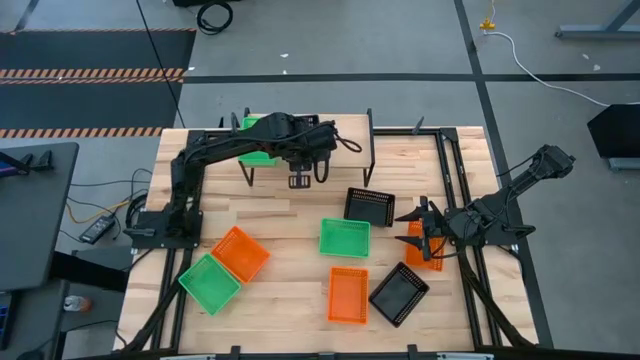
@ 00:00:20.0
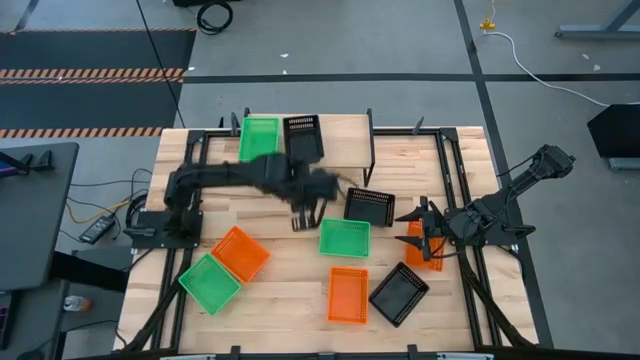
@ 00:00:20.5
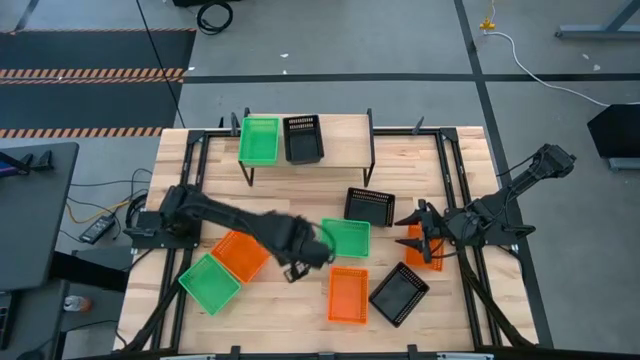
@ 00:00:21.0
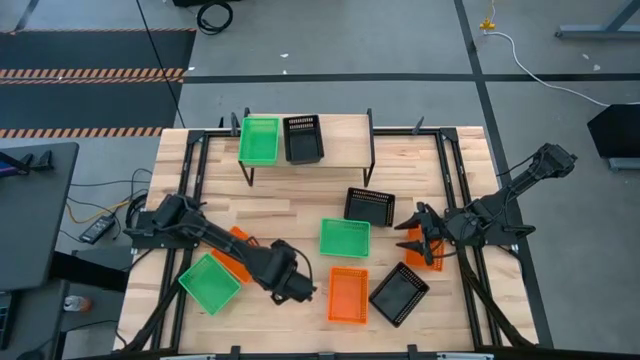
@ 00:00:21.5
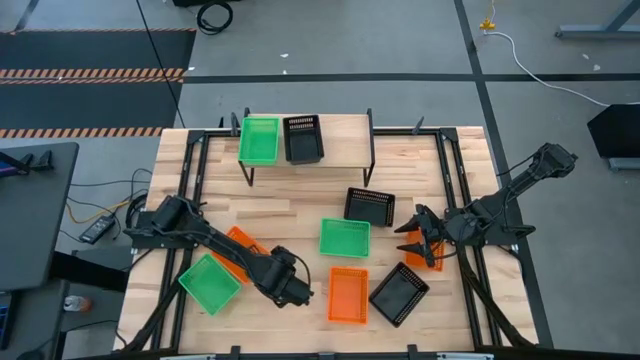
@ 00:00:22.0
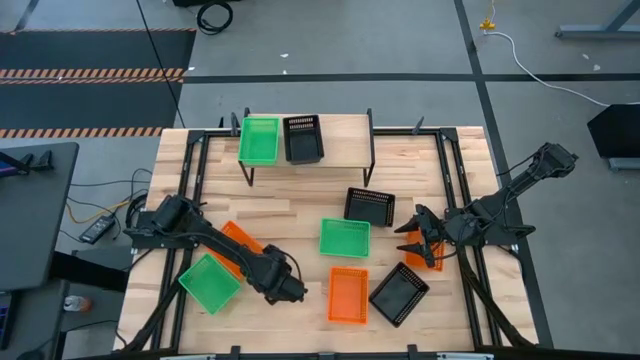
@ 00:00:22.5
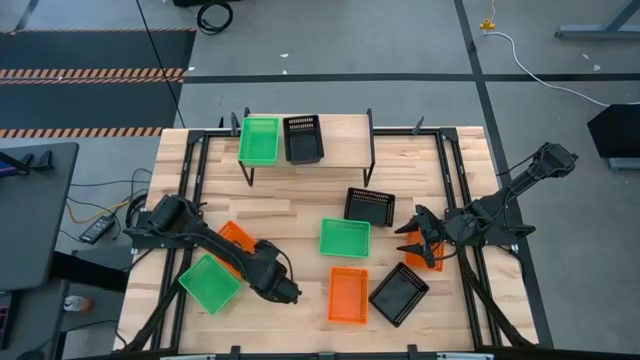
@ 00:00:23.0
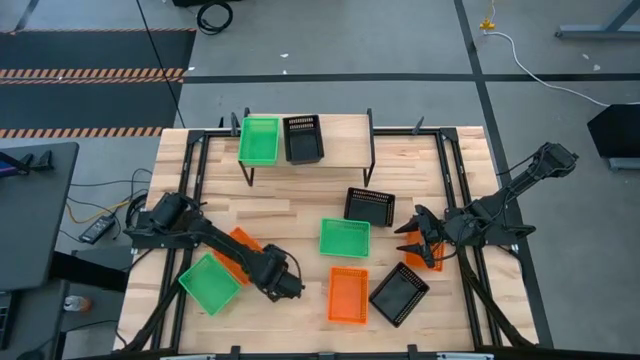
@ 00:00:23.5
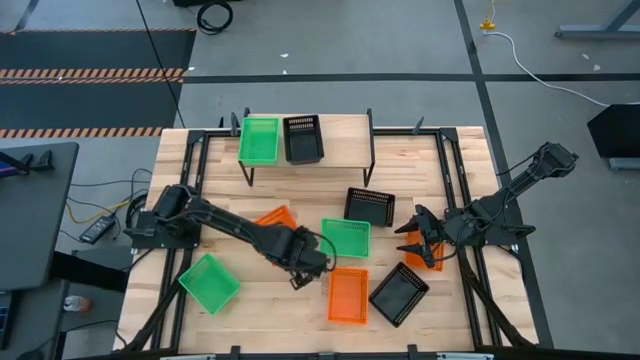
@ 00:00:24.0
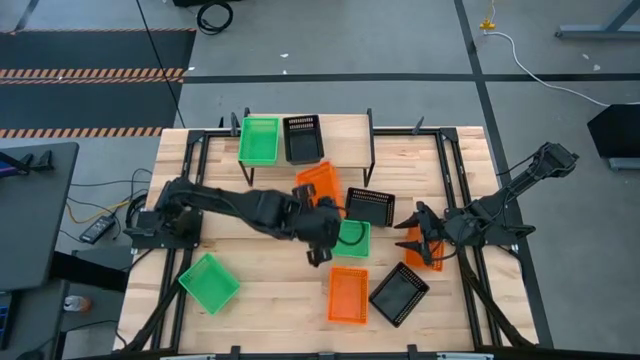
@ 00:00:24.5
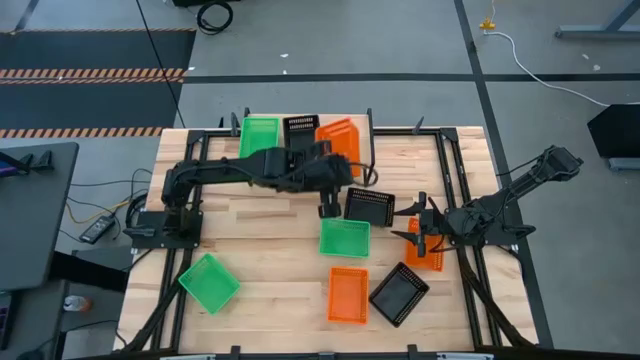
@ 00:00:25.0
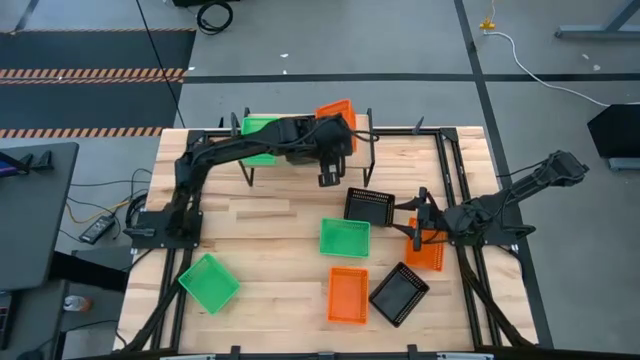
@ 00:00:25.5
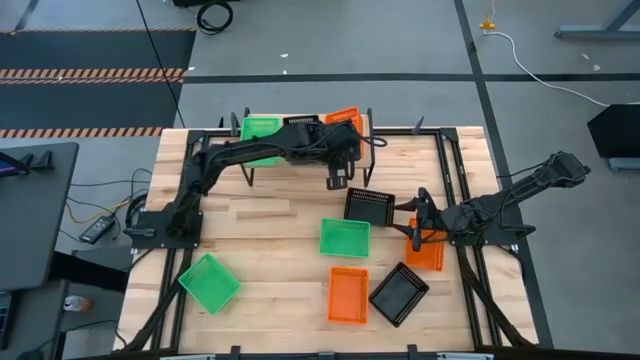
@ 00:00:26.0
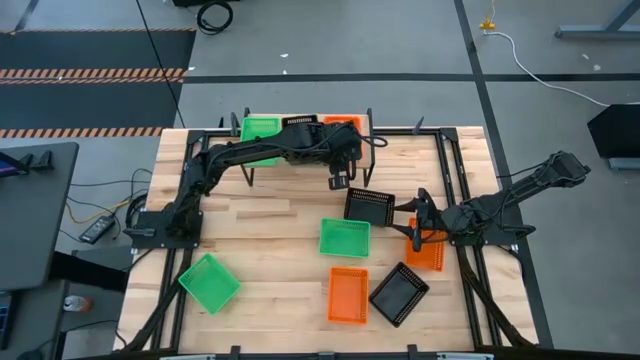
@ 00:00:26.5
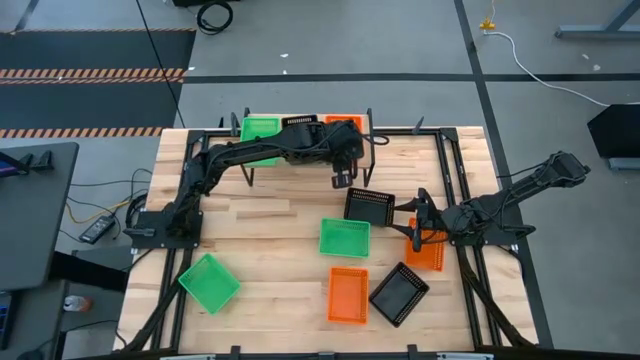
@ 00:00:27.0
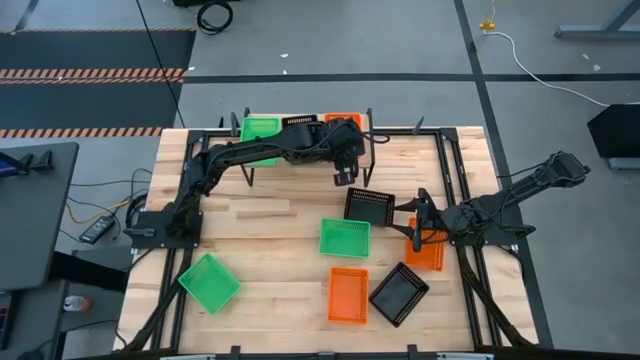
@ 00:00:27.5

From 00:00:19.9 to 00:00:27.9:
Task: Stack baskets on shelf by color
Put the left orange bin on the shelf

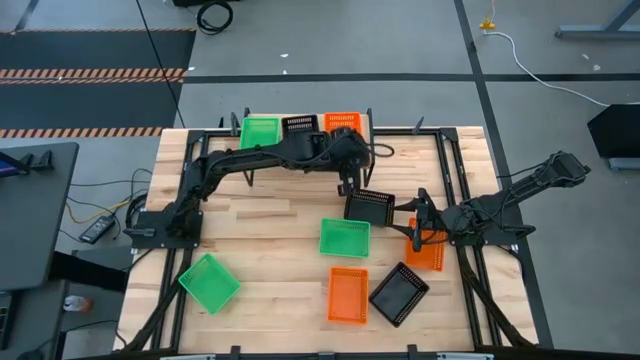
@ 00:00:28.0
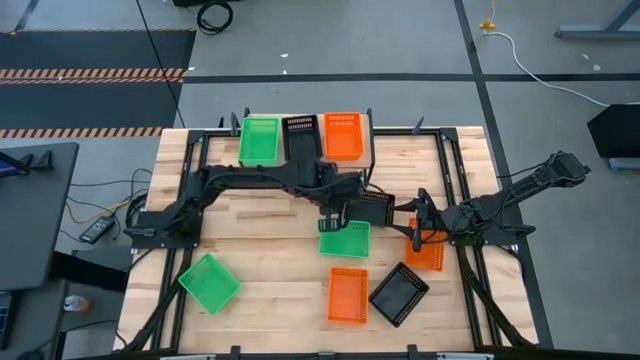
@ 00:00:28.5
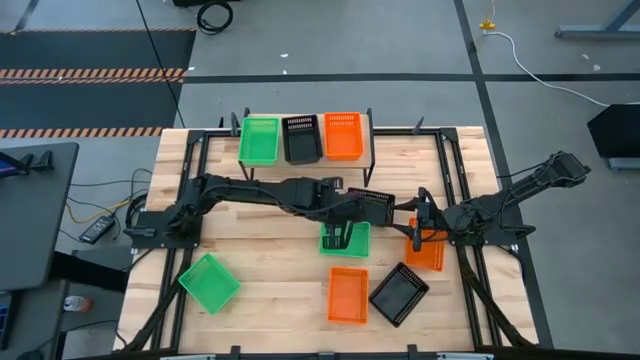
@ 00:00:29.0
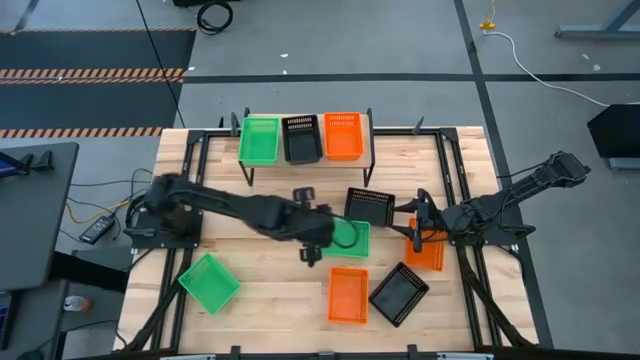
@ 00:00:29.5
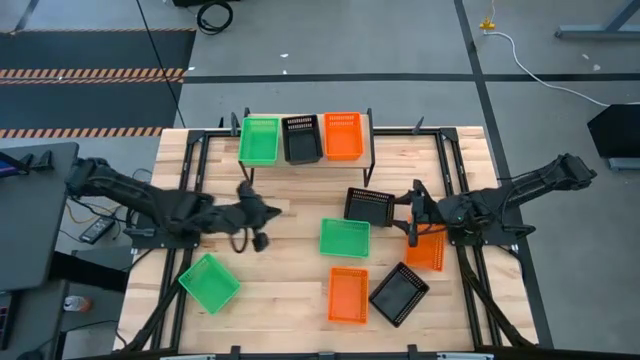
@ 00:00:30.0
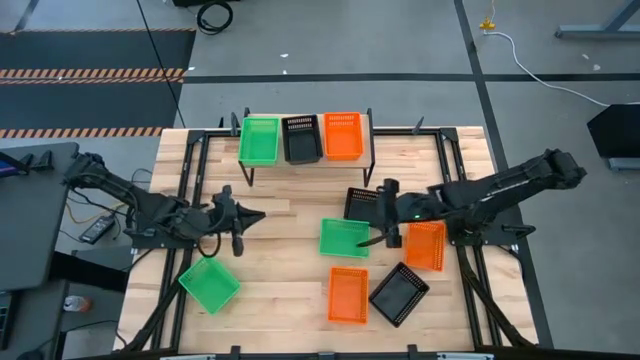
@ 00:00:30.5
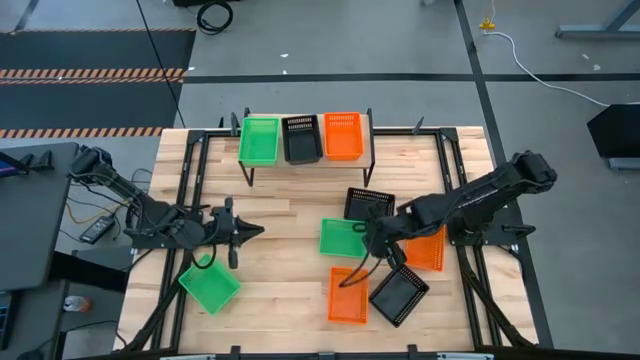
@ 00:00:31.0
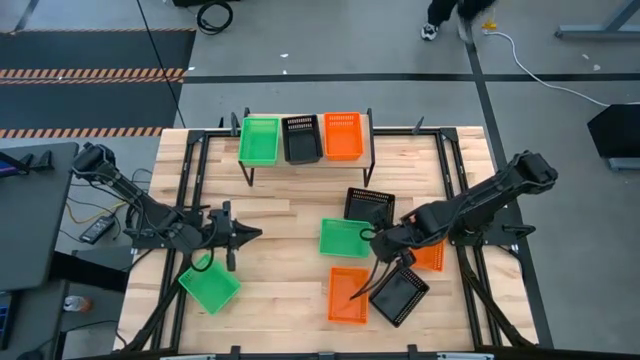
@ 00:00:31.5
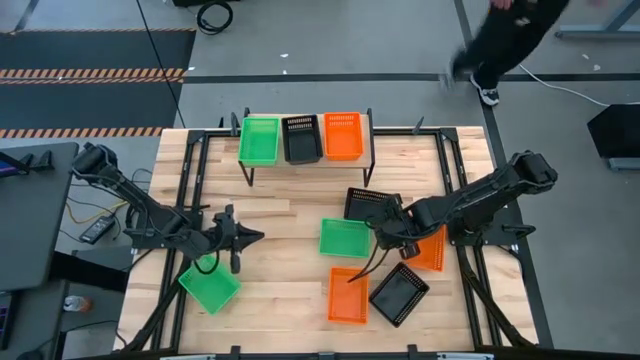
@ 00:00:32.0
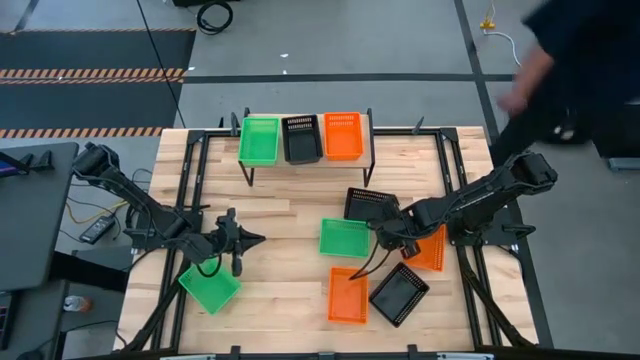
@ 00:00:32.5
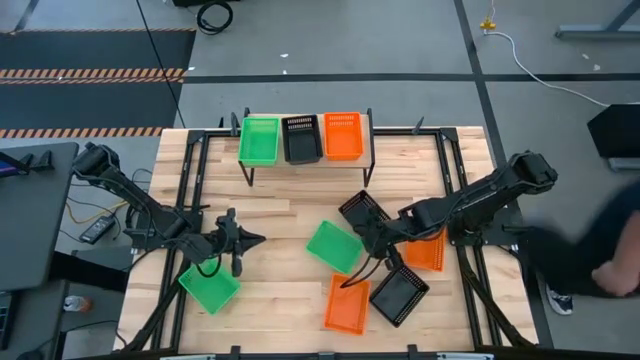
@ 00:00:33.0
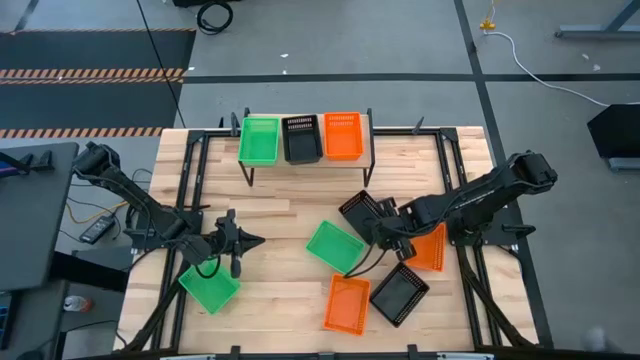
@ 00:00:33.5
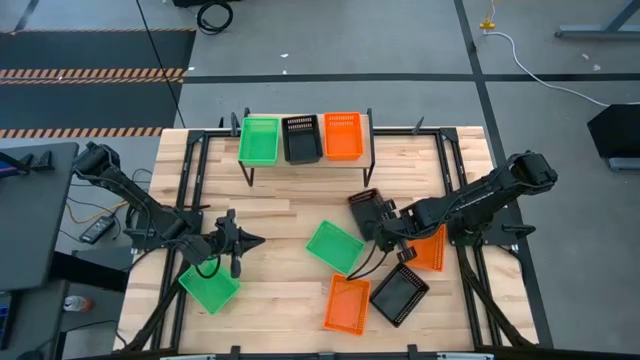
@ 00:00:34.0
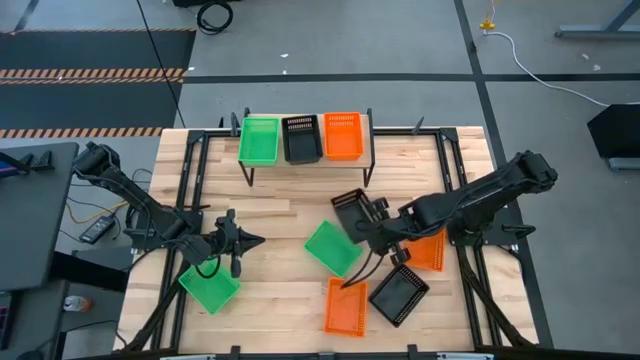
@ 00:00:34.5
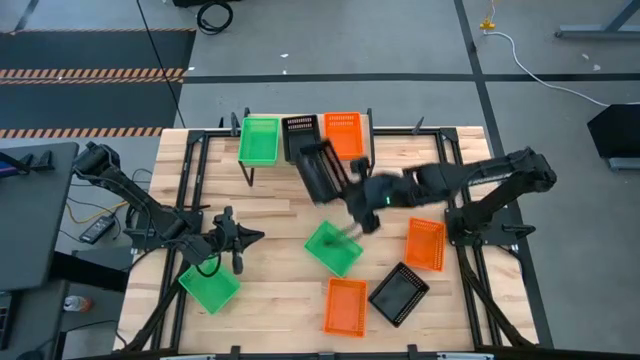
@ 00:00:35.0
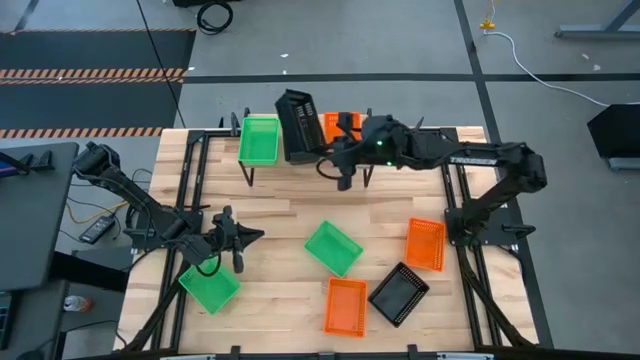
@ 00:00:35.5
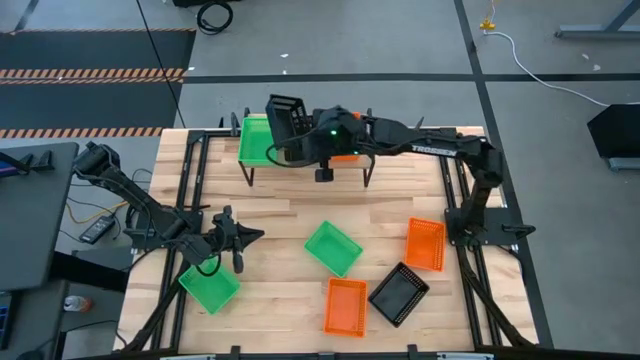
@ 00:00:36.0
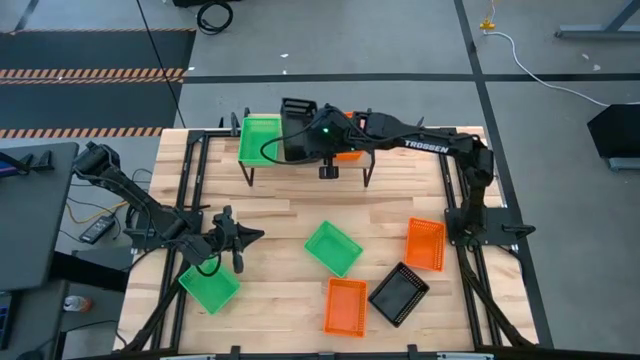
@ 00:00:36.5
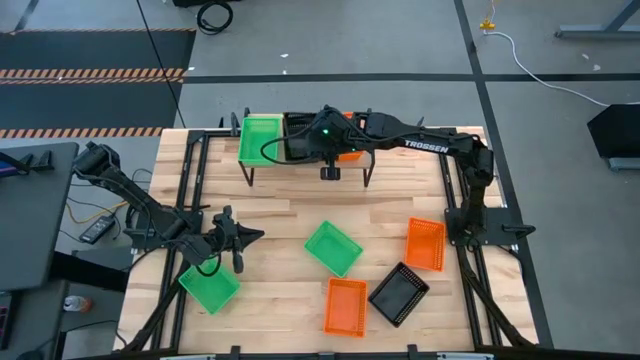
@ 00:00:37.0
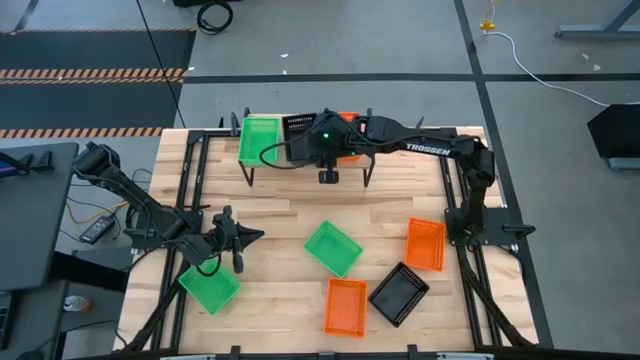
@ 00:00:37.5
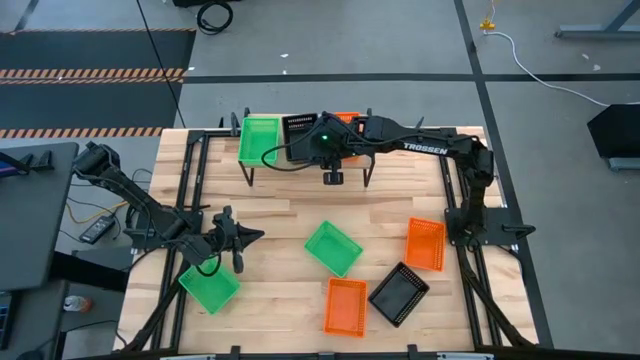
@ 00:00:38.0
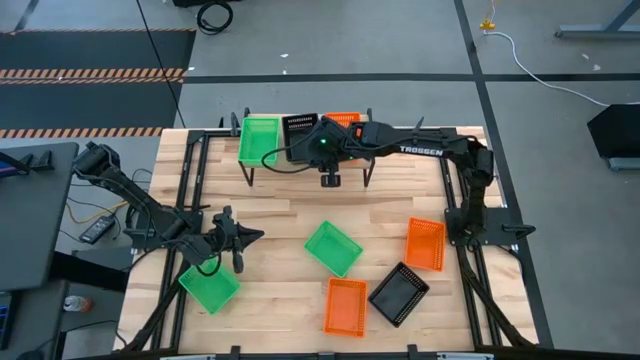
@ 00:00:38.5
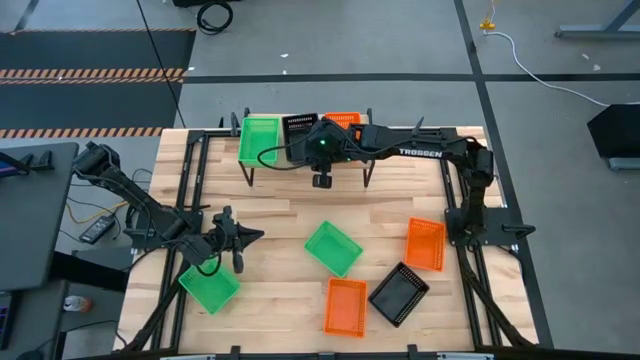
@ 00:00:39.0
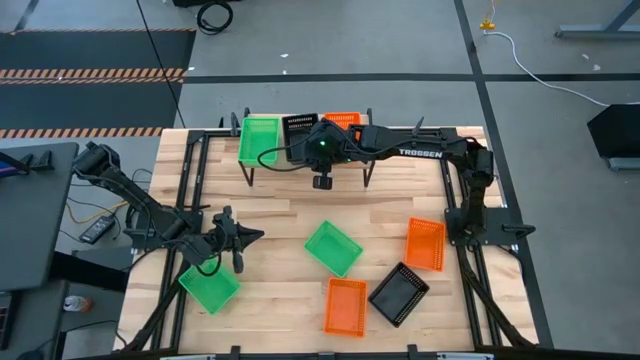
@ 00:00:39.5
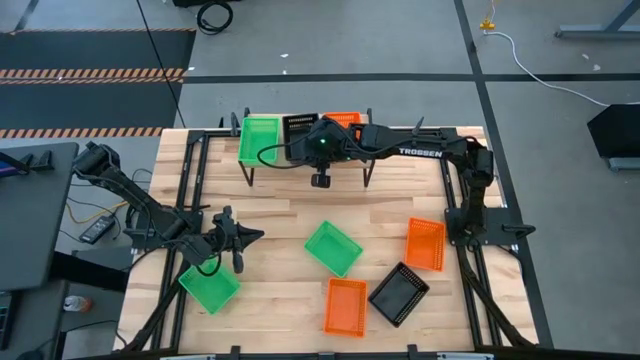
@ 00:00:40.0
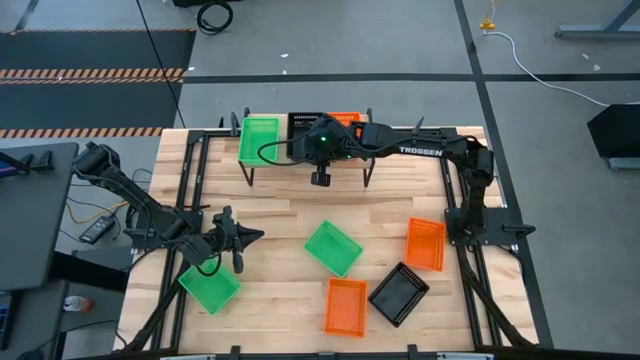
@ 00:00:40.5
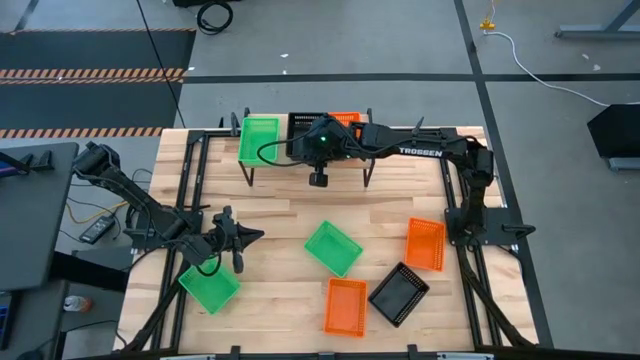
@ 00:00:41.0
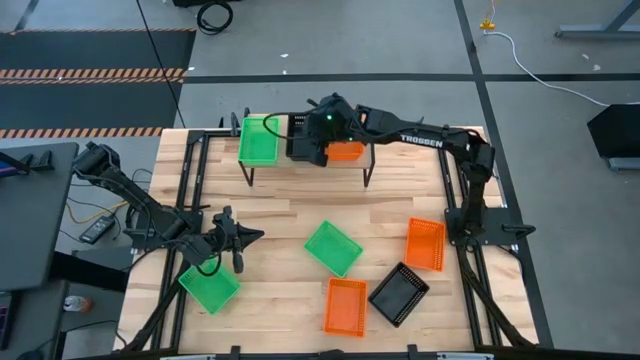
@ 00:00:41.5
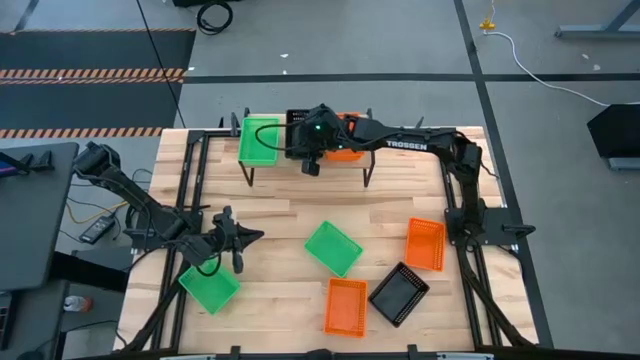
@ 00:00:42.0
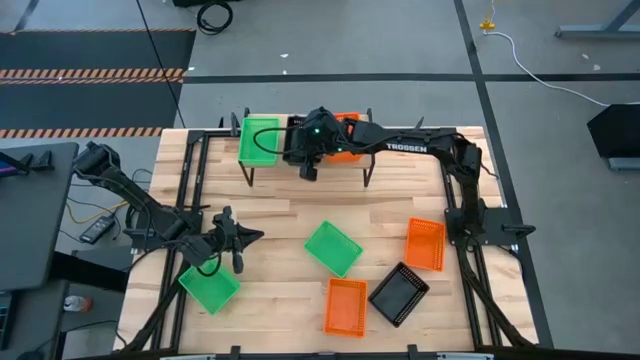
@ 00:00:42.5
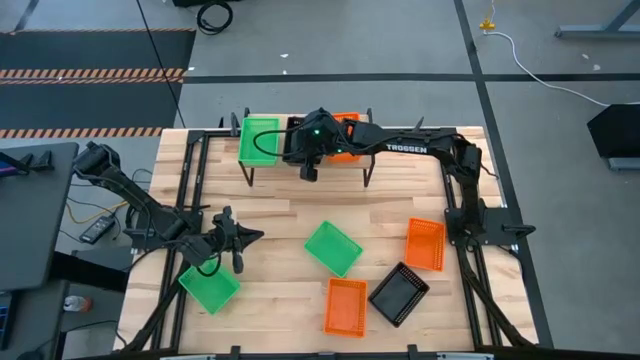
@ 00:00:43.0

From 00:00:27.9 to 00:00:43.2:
Stack the top black bin on top of the black bin on the shelf
